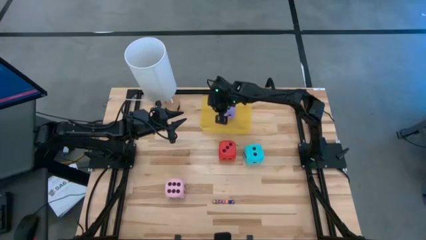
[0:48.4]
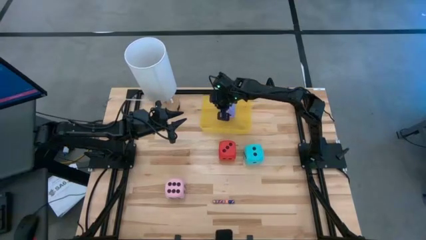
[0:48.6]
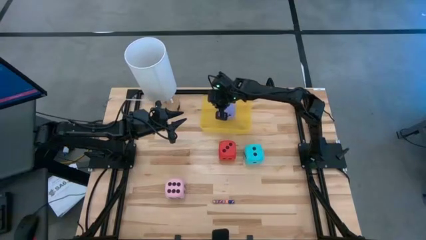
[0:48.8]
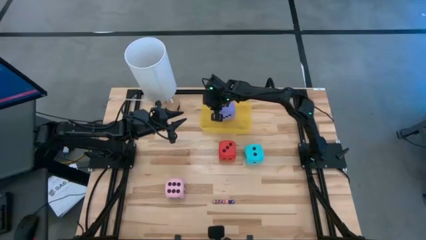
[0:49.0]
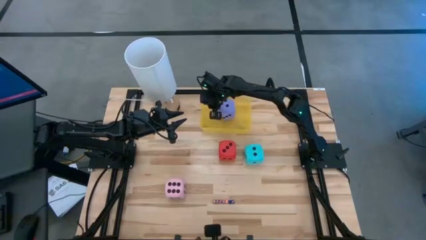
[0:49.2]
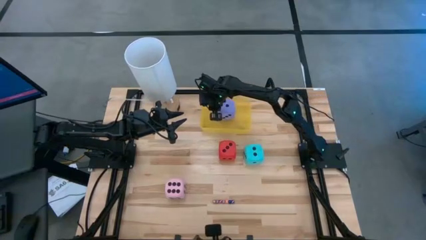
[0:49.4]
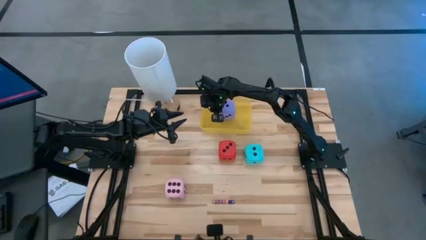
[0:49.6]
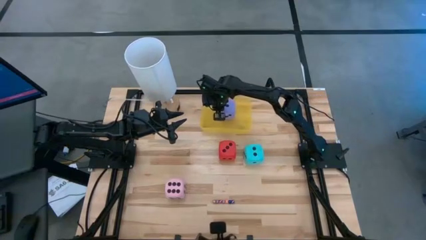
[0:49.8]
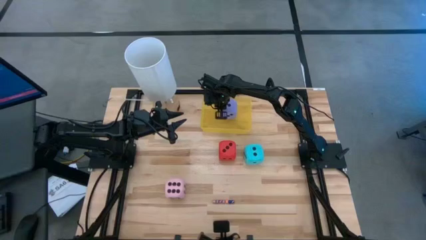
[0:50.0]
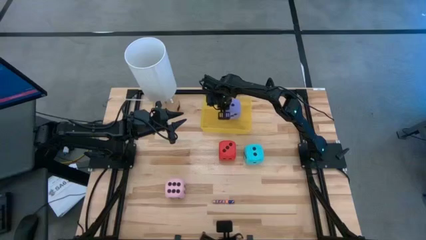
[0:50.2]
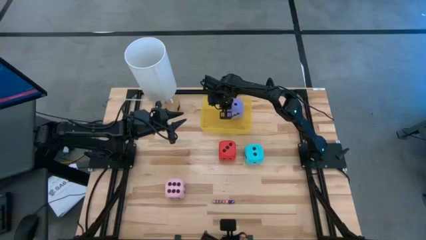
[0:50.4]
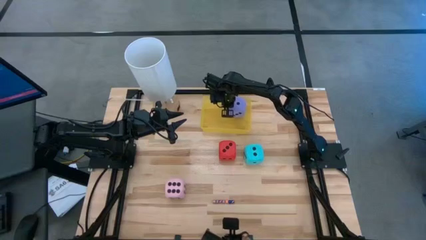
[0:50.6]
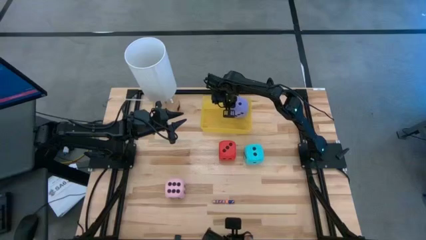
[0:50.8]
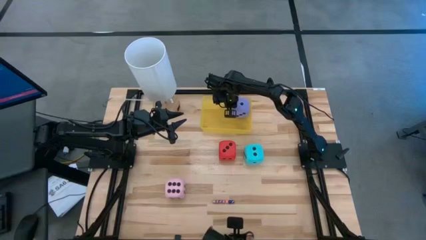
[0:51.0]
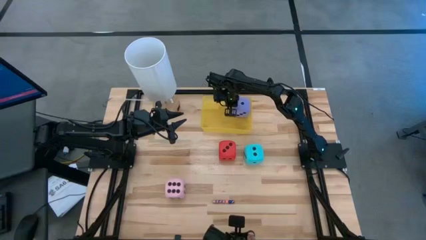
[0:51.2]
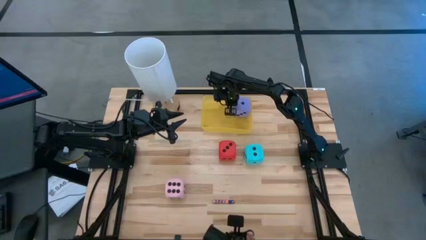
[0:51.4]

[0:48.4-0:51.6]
Task: Pick & Place Dice
Adjust the big purple dice in the yellow bin

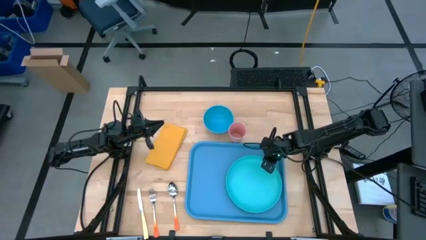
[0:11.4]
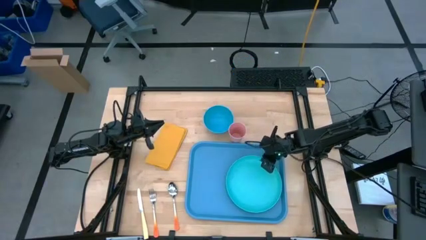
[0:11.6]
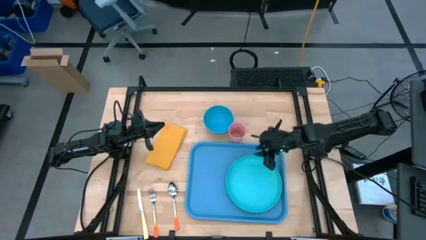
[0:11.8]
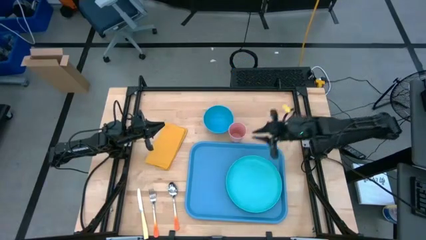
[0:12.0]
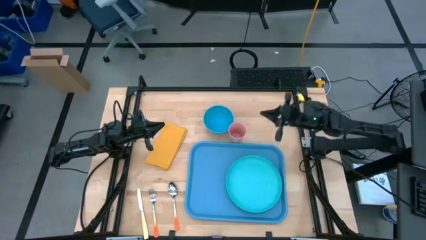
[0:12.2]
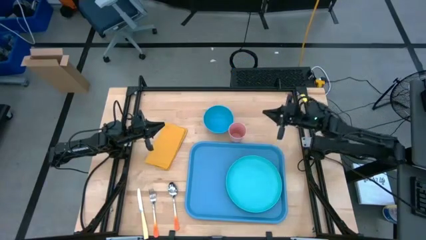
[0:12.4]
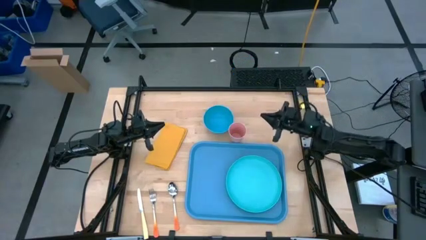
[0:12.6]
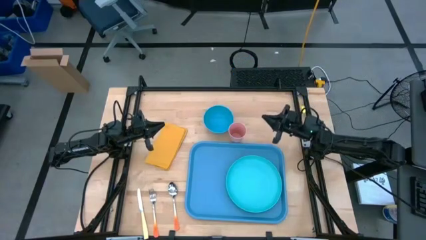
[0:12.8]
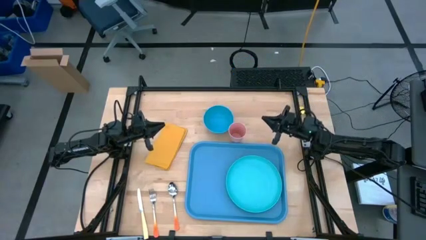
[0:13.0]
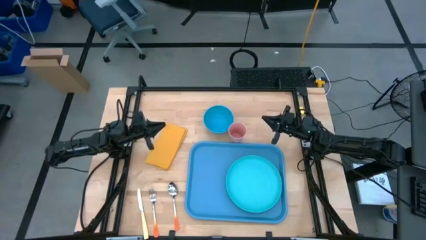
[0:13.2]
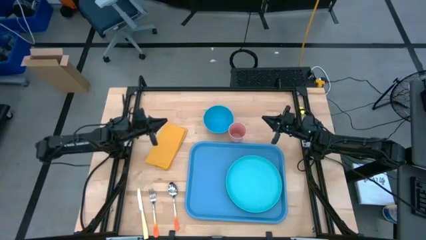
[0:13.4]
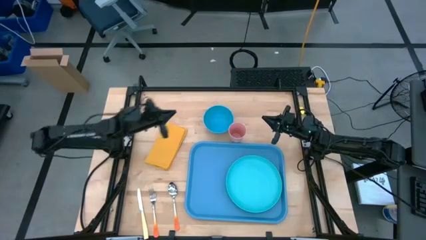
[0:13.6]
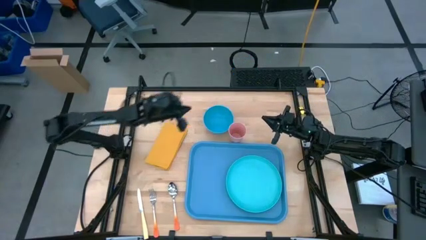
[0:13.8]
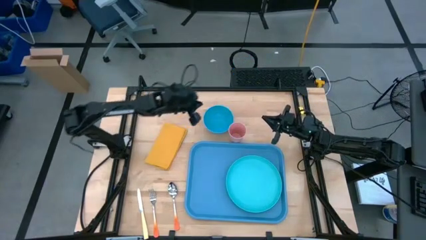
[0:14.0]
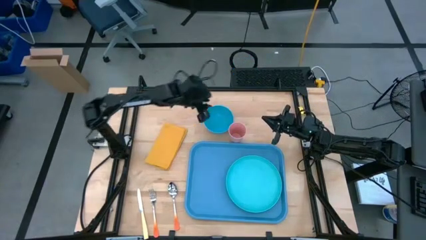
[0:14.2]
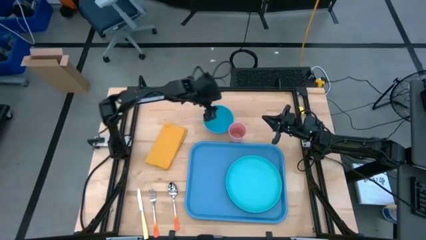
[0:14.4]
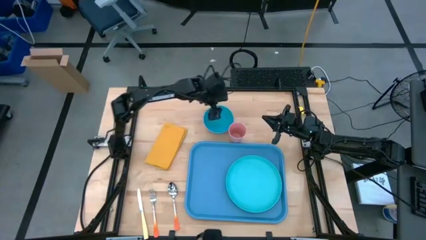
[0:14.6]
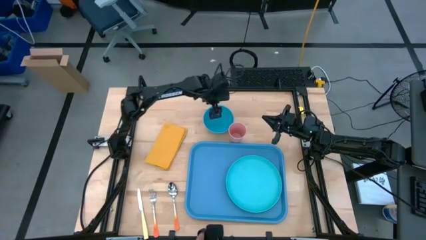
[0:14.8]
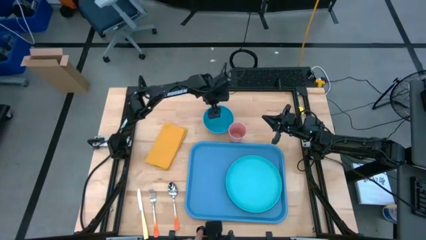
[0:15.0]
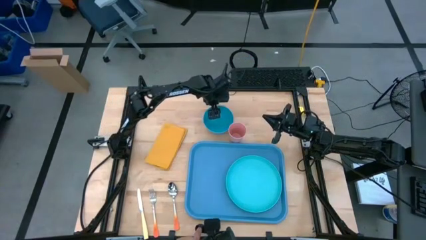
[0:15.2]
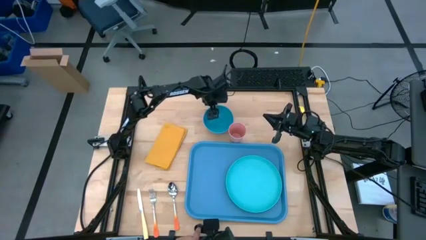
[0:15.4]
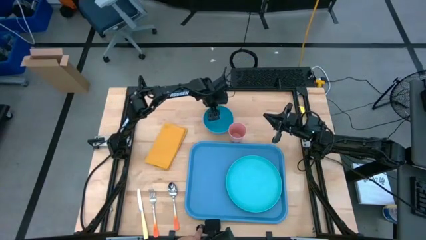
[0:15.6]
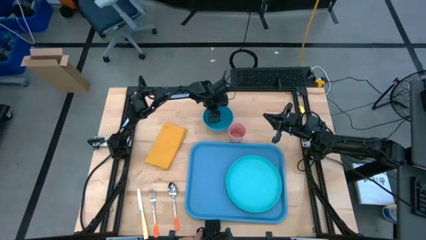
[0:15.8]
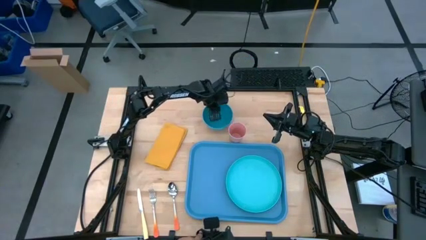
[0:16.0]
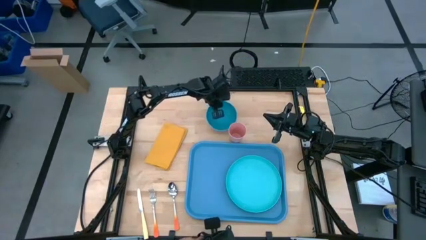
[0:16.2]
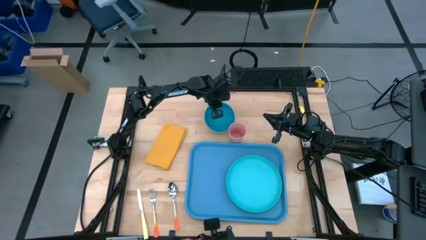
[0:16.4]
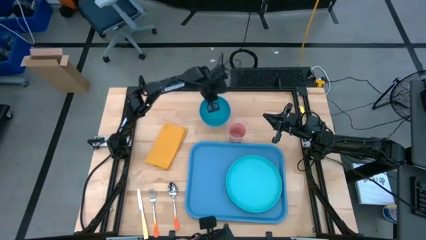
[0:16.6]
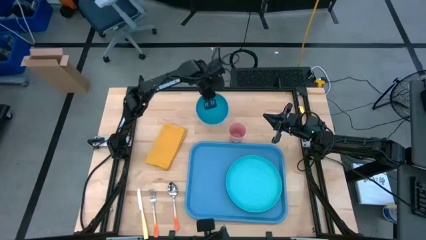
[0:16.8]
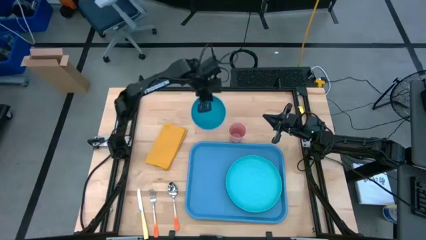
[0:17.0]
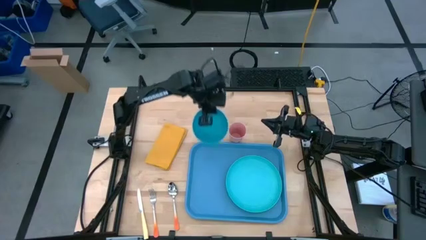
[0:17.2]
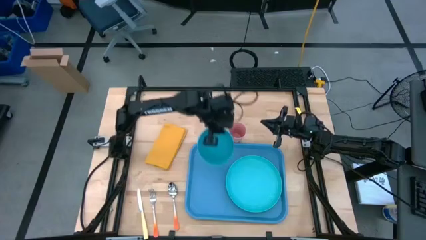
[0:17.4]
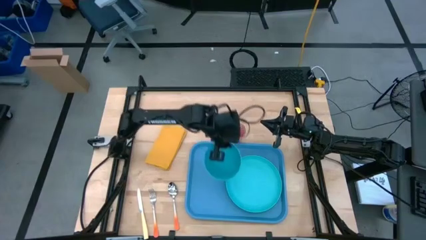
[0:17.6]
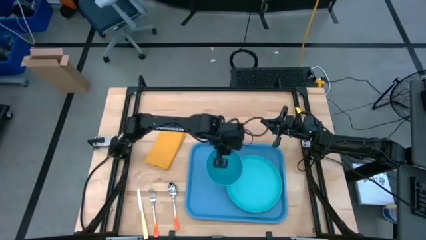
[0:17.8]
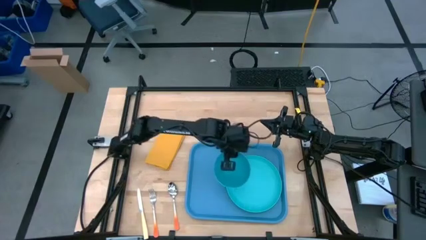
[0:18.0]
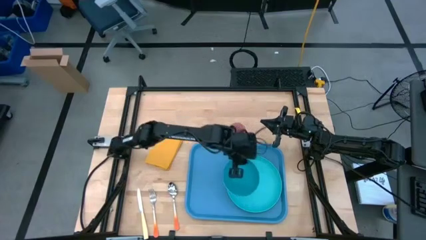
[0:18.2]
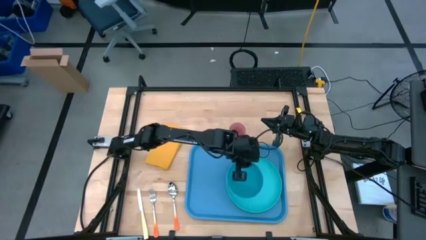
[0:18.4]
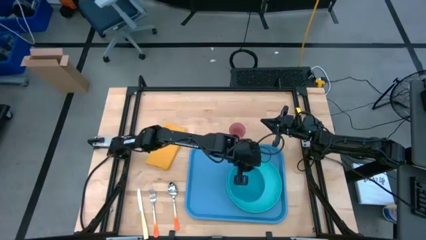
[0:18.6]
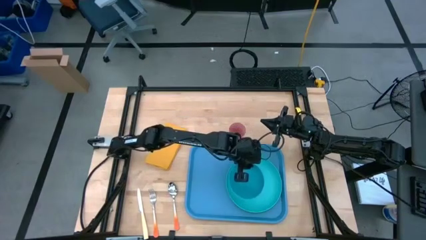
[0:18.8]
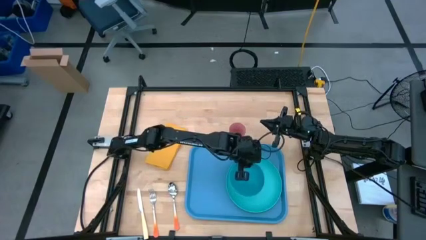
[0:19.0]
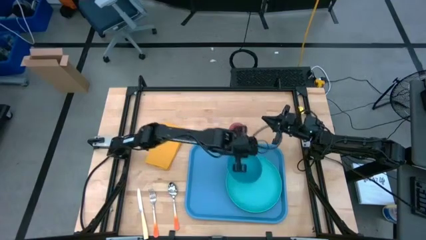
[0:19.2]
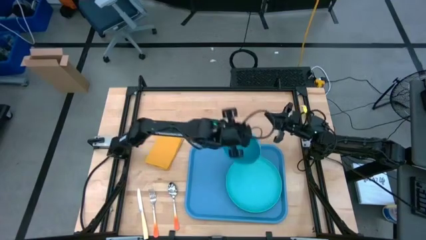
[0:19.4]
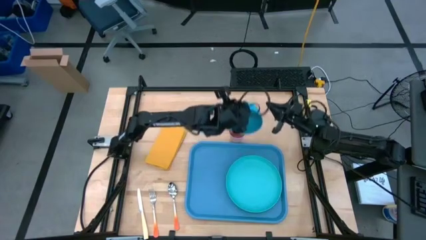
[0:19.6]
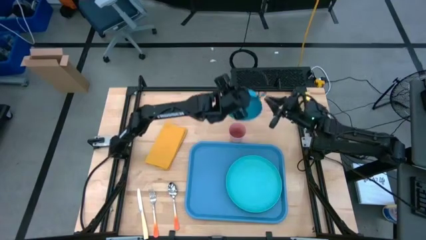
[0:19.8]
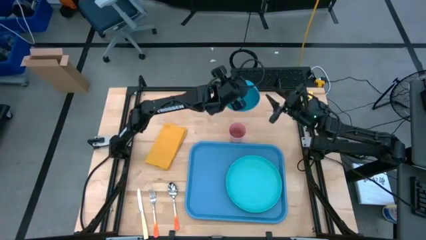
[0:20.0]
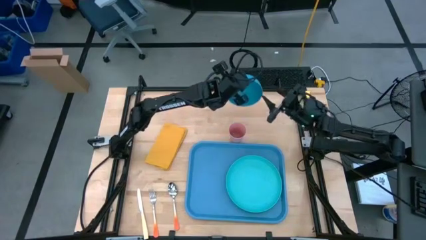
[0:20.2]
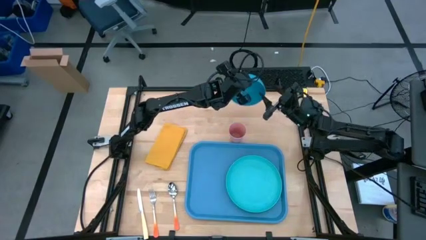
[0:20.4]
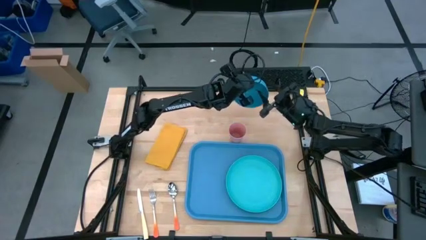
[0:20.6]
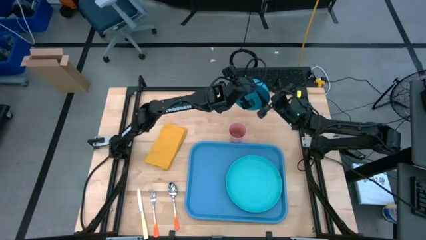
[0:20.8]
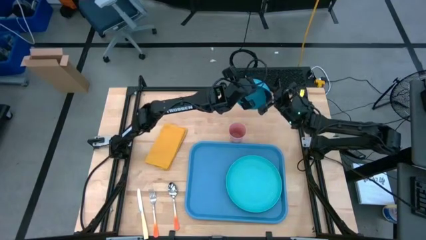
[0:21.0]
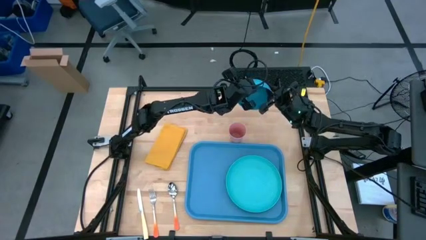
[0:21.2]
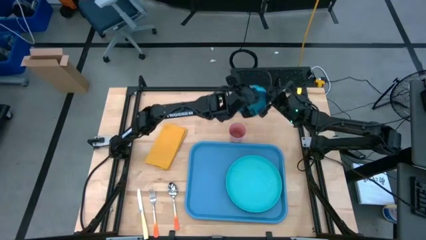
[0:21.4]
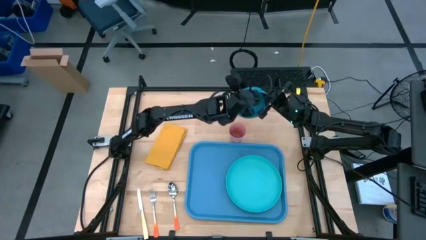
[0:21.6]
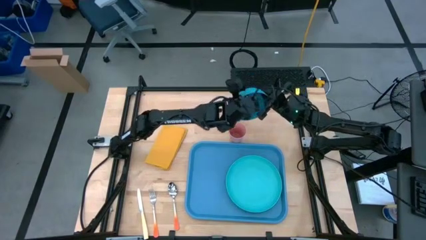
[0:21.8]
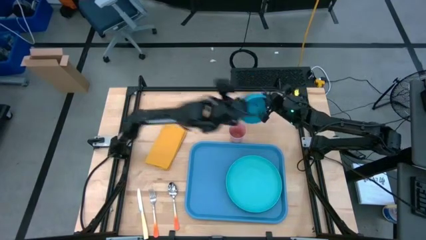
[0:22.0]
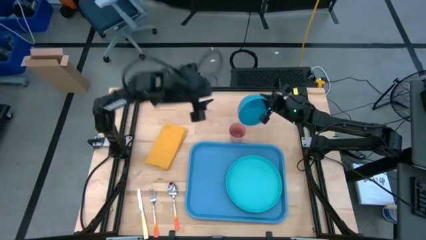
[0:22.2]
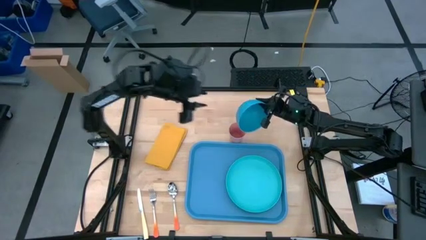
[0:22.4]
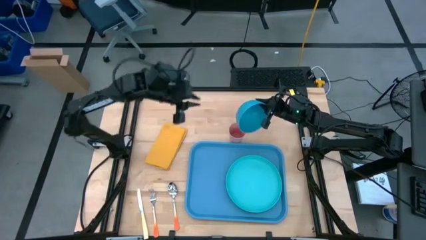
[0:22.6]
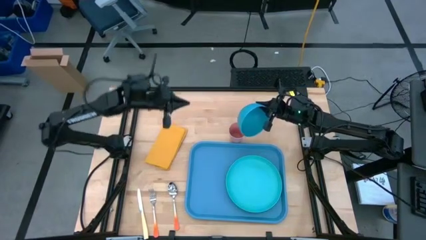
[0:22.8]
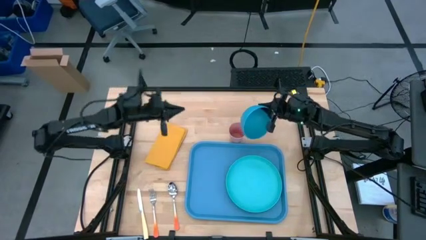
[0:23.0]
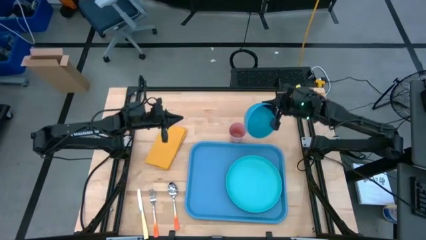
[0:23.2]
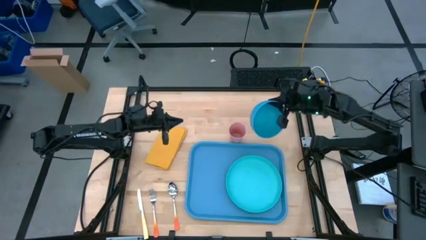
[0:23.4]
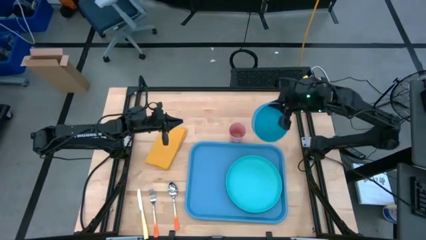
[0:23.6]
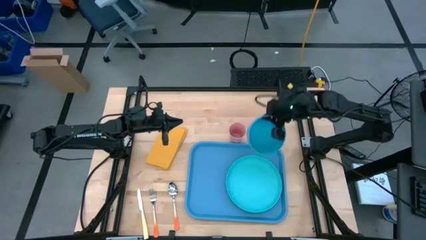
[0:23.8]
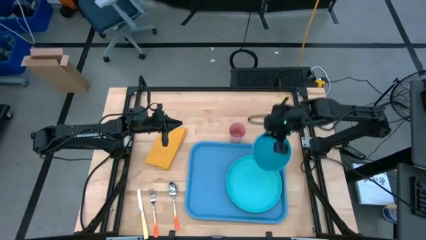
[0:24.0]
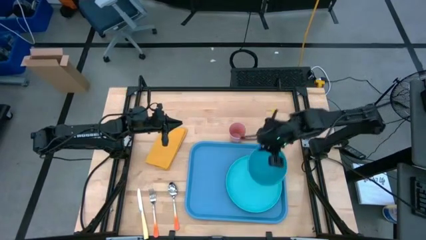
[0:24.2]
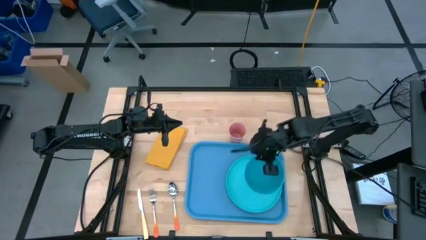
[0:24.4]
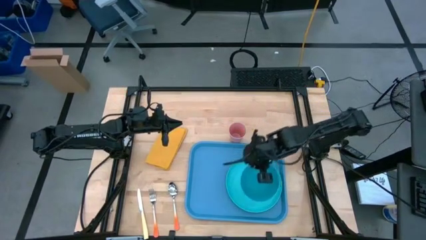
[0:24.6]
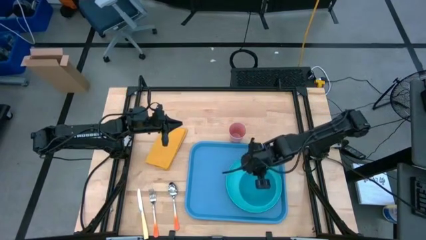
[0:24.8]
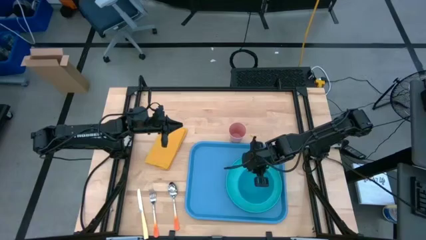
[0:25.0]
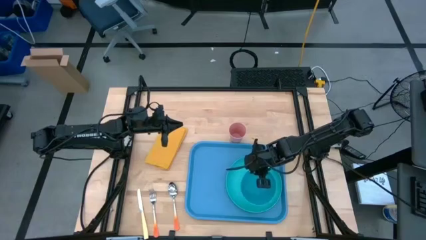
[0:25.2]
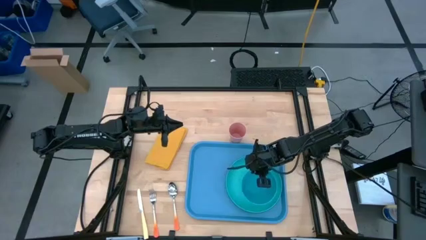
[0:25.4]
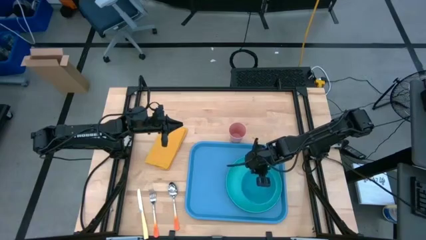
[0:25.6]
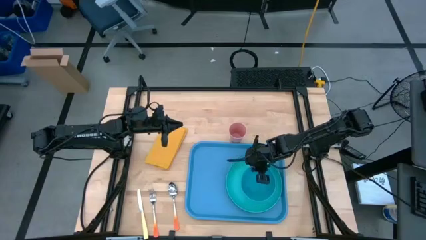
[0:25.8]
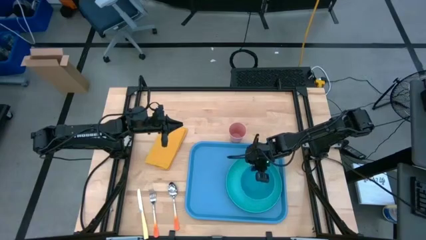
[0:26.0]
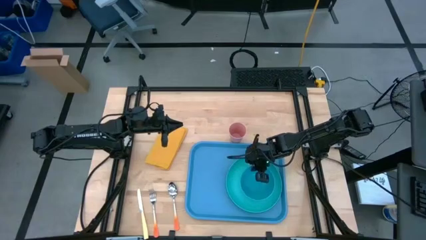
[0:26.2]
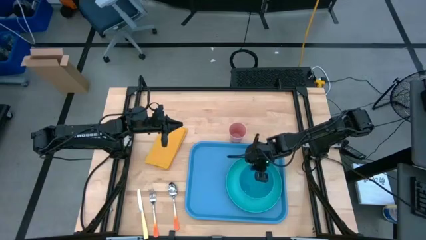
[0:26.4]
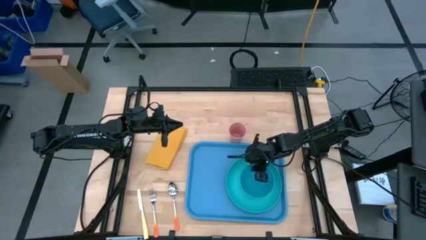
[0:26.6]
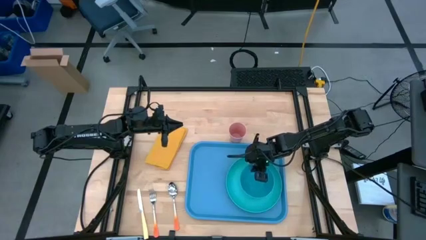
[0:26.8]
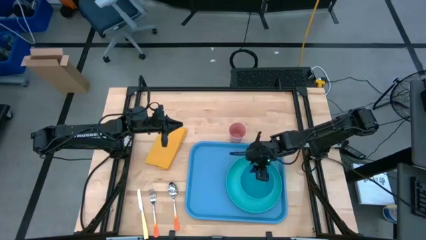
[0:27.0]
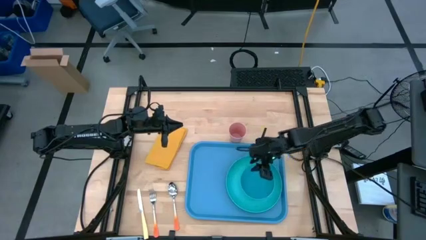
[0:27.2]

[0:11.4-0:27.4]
Task: Set up tray
Put the blue bowl on the light blue plate
